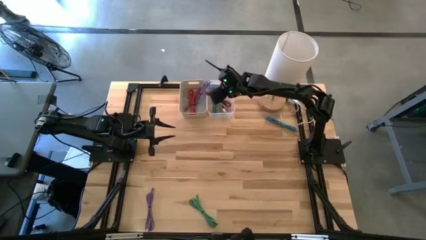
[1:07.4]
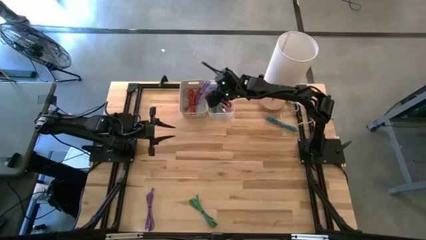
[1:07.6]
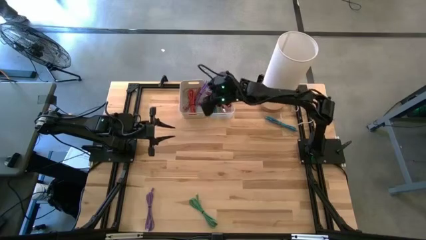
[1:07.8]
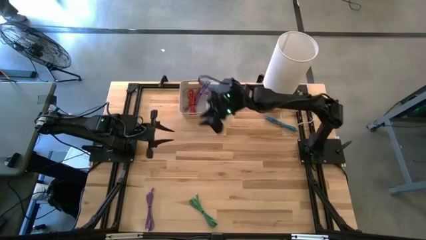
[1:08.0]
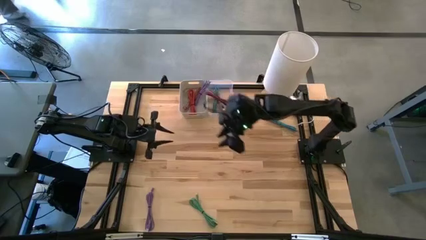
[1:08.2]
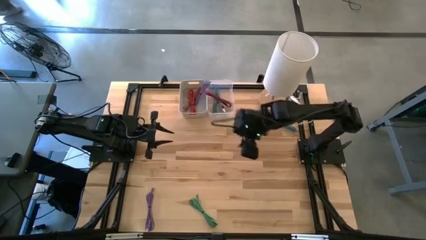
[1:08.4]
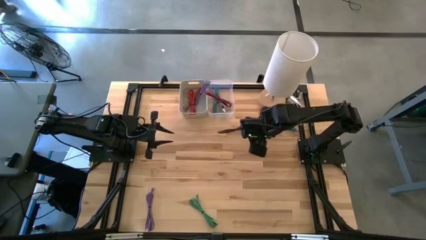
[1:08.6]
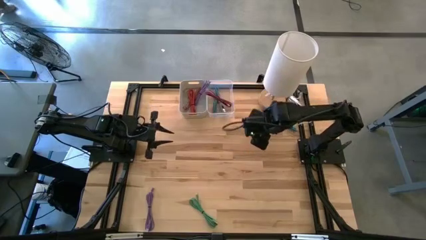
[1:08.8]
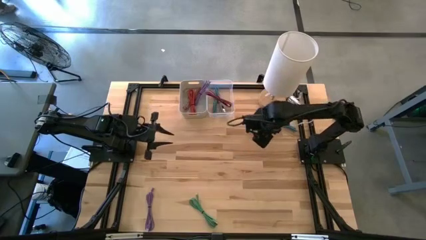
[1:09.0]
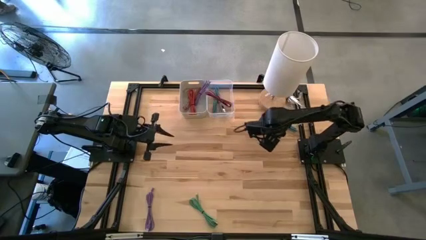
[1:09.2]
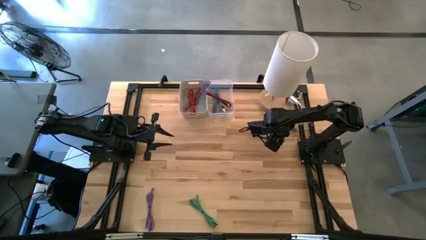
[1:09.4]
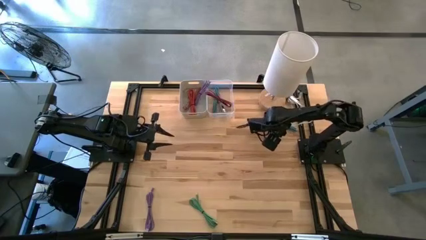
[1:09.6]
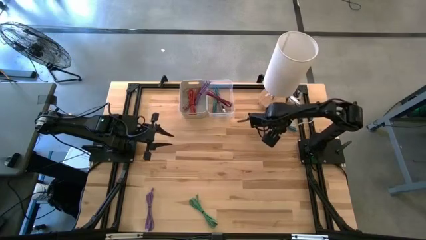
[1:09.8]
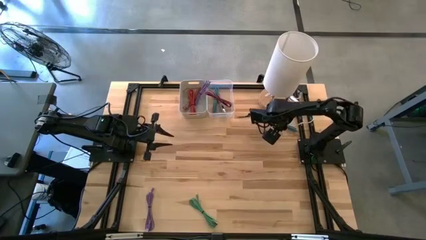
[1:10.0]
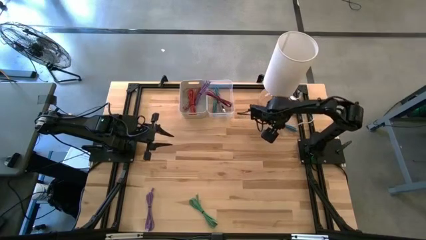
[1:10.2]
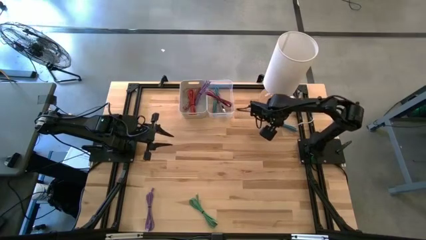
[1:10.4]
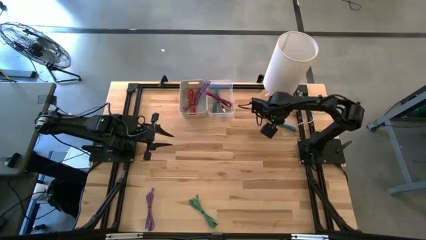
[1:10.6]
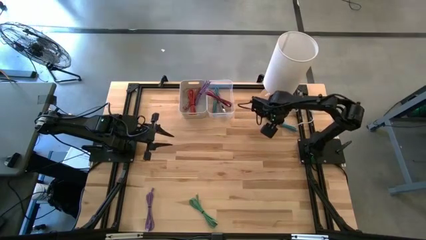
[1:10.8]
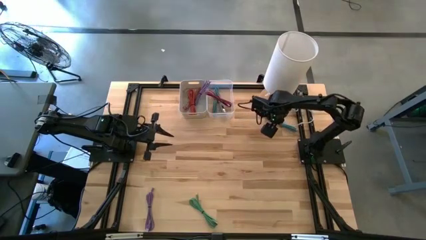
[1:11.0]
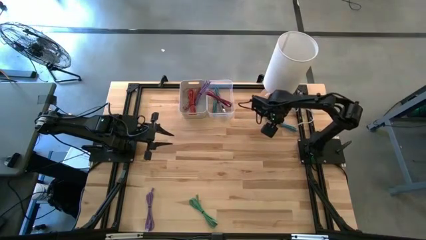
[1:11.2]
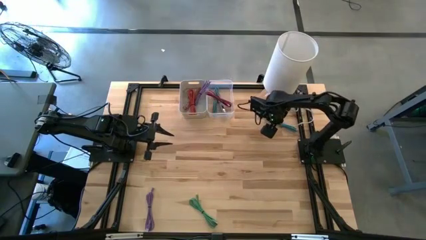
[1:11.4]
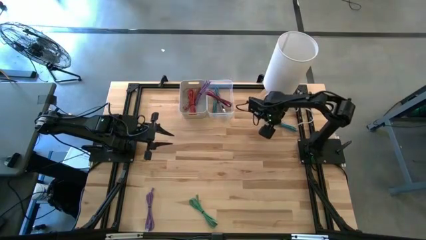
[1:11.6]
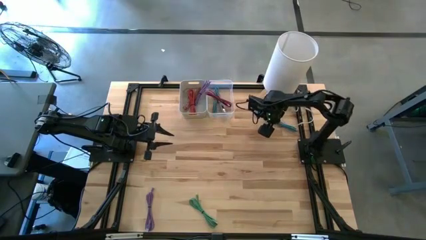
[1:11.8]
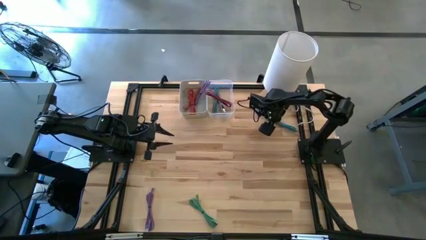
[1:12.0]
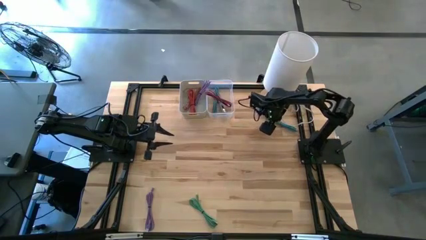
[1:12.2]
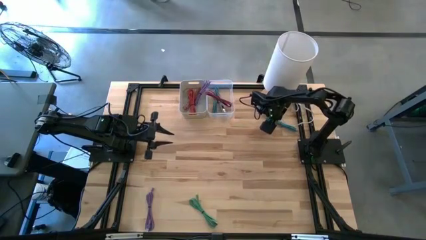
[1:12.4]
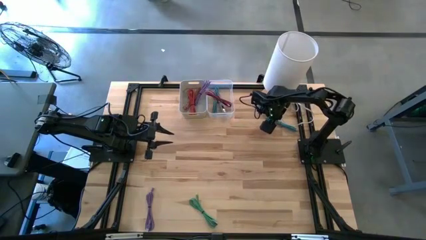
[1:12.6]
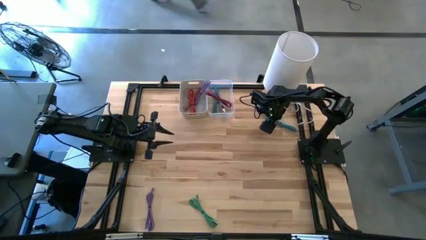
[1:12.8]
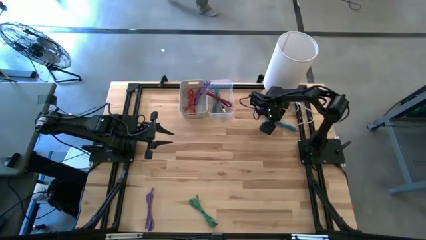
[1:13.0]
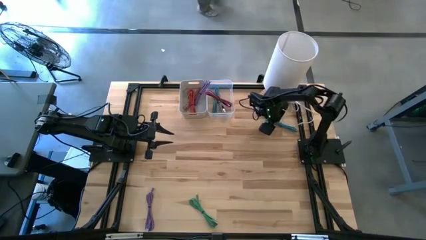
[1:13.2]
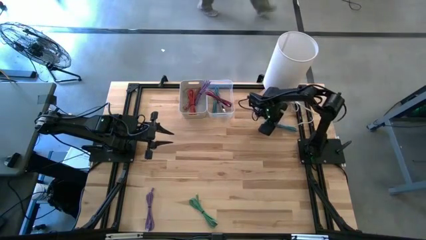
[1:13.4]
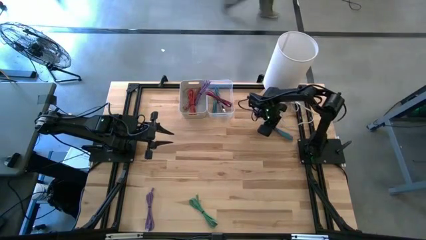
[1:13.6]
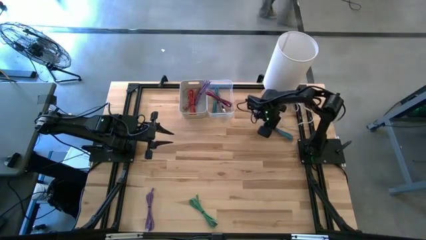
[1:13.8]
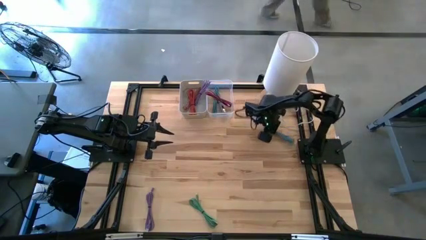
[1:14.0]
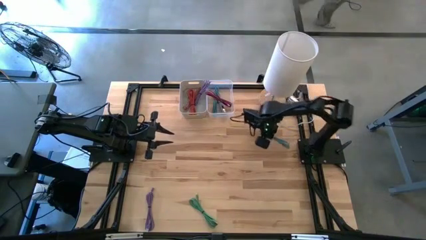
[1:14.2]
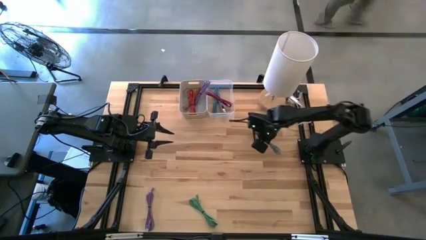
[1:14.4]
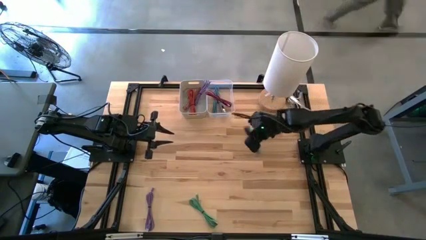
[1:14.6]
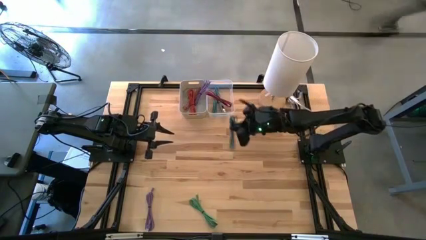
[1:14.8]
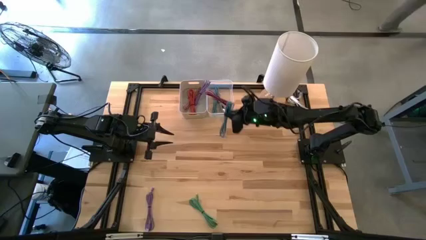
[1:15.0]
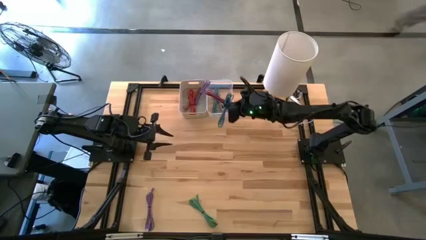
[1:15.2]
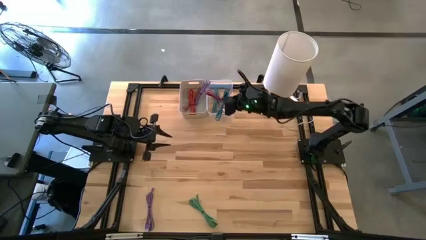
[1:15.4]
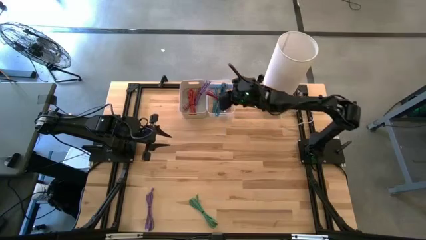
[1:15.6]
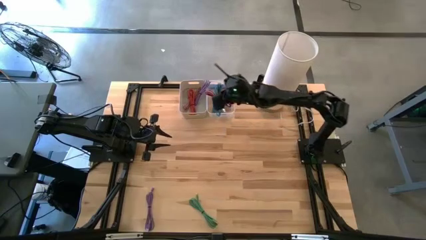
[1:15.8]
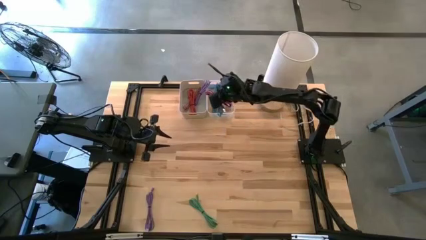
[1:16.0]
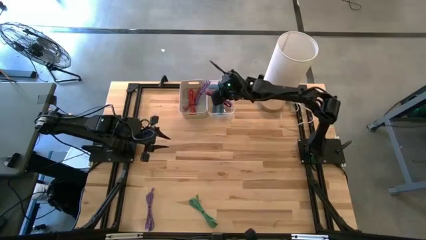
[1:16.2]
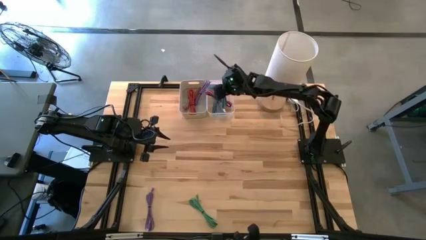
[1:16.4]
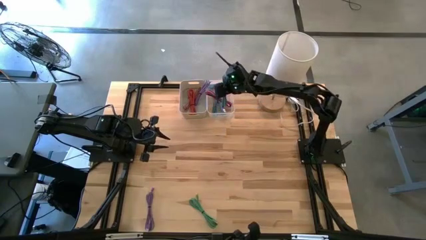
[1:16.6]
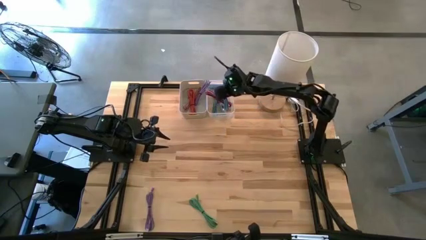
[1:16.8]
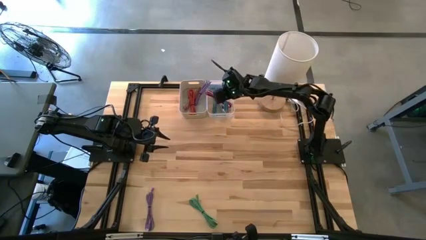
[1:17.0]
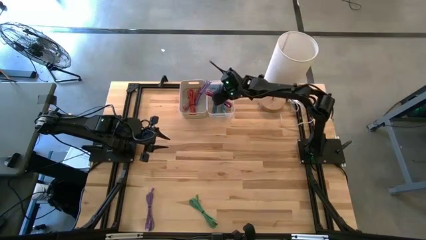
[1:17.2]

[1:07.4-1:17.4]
Task: Pick & Place USB Port
Put the blue and white USB cable into the white transparent bin

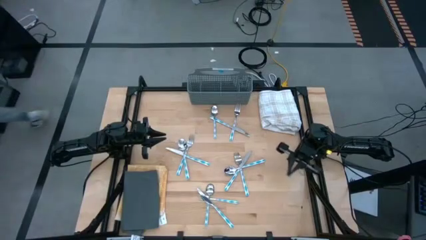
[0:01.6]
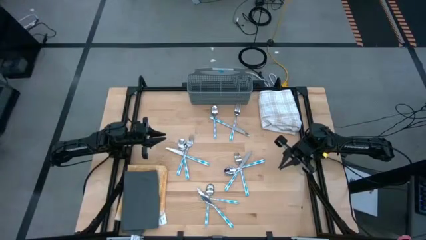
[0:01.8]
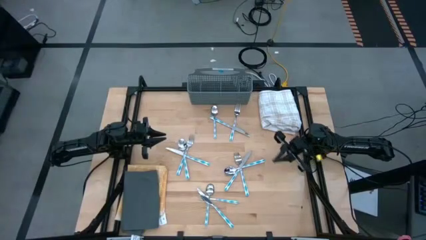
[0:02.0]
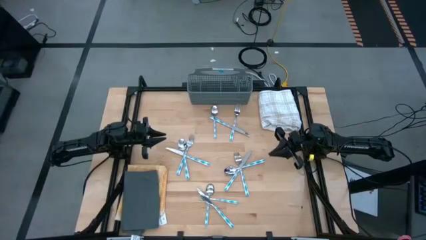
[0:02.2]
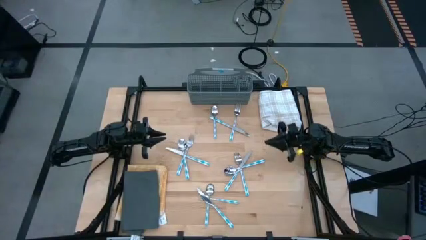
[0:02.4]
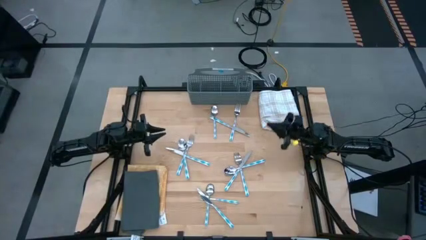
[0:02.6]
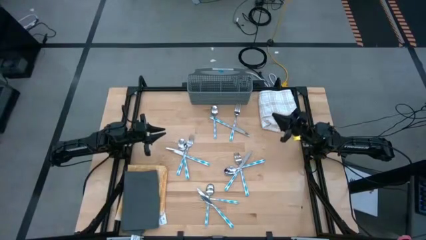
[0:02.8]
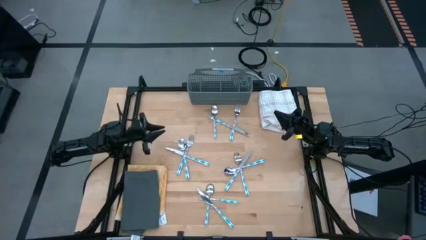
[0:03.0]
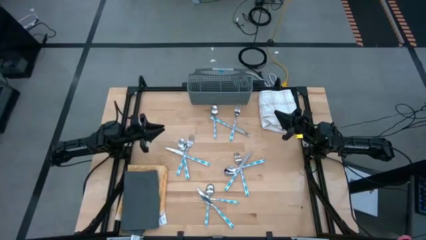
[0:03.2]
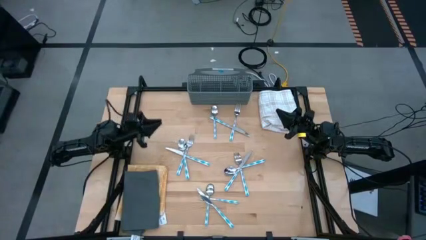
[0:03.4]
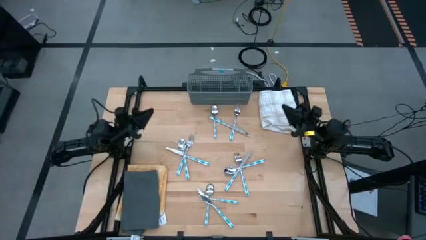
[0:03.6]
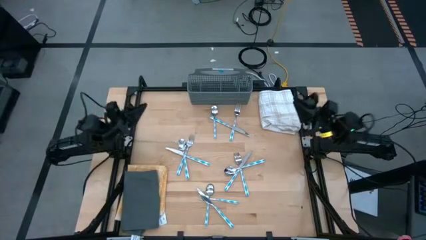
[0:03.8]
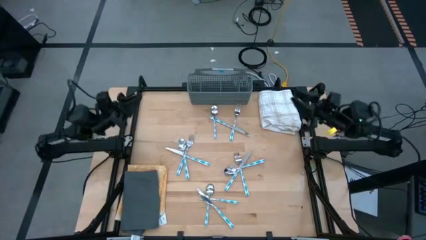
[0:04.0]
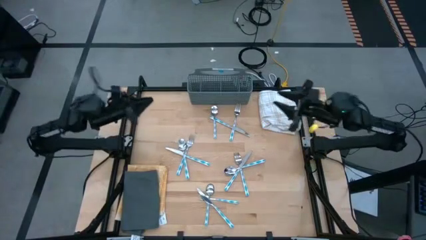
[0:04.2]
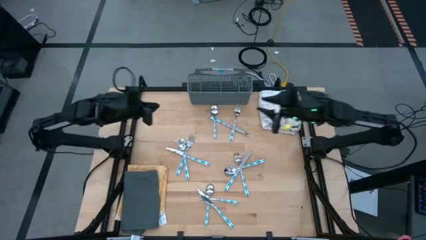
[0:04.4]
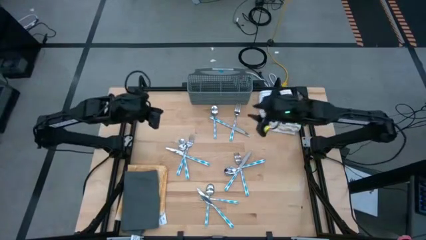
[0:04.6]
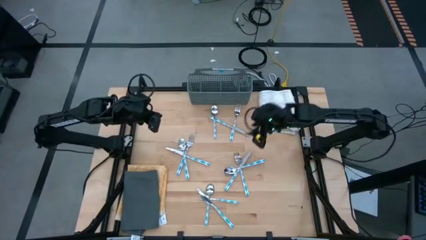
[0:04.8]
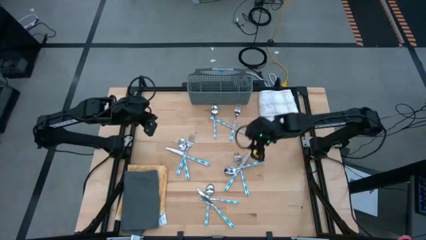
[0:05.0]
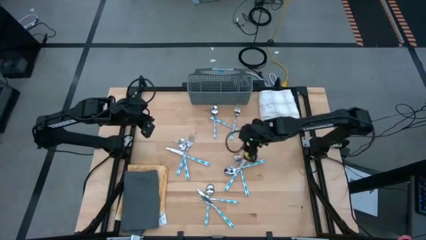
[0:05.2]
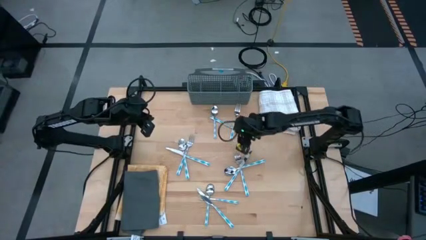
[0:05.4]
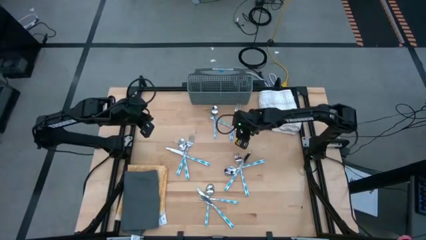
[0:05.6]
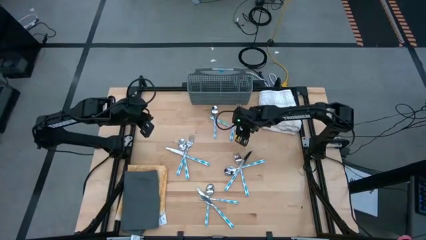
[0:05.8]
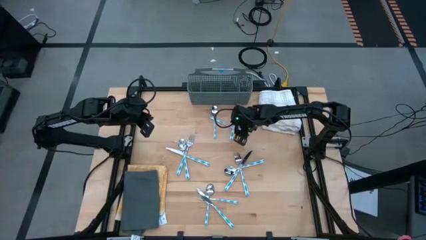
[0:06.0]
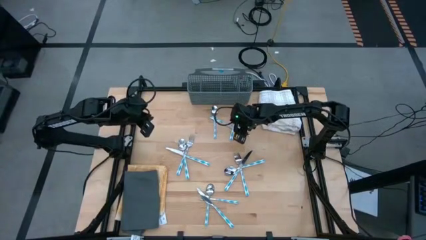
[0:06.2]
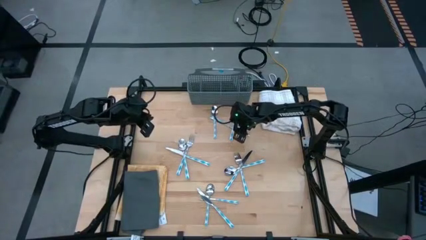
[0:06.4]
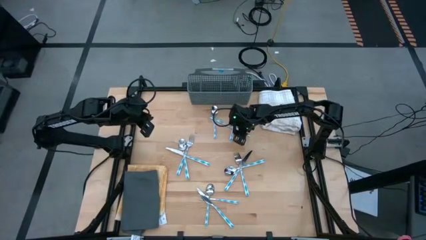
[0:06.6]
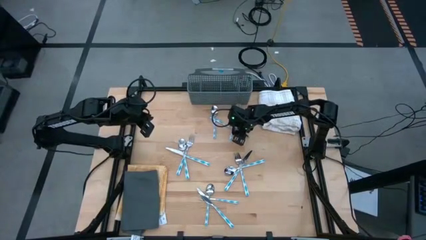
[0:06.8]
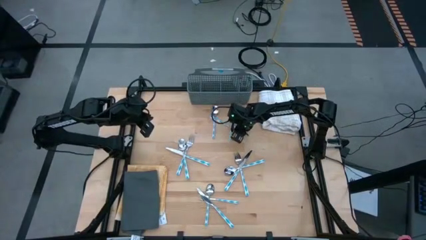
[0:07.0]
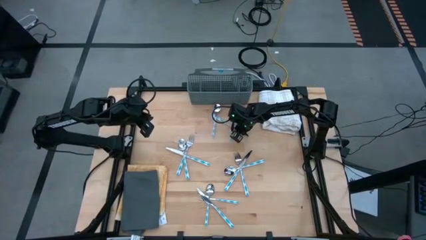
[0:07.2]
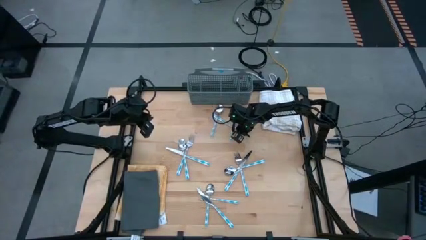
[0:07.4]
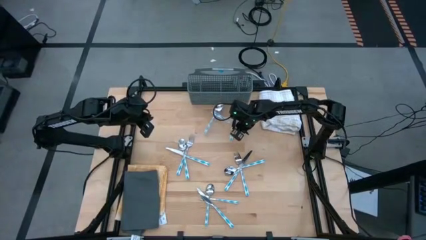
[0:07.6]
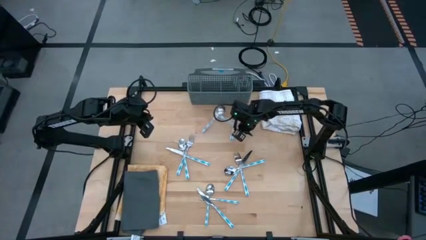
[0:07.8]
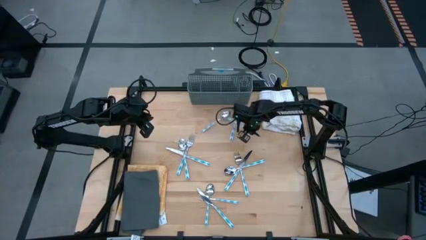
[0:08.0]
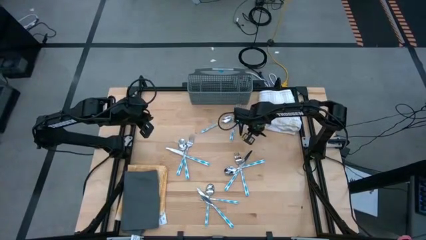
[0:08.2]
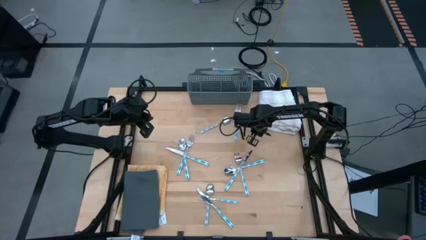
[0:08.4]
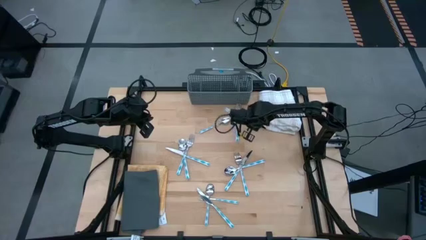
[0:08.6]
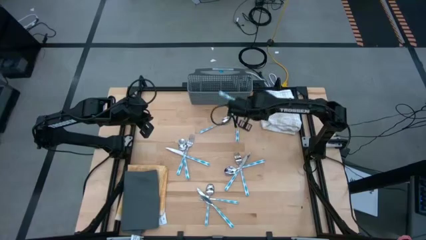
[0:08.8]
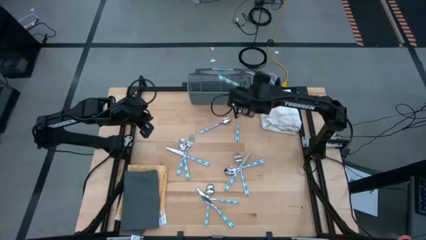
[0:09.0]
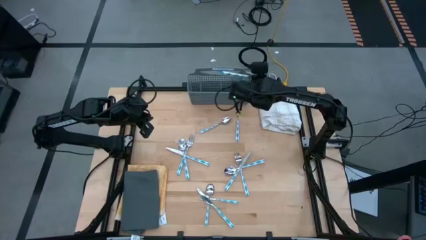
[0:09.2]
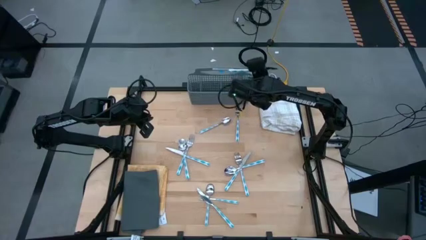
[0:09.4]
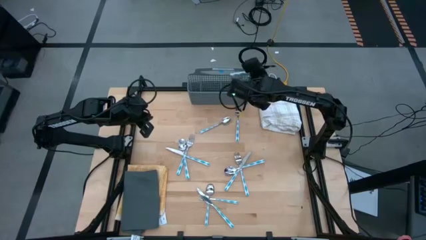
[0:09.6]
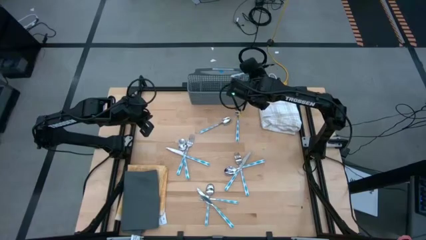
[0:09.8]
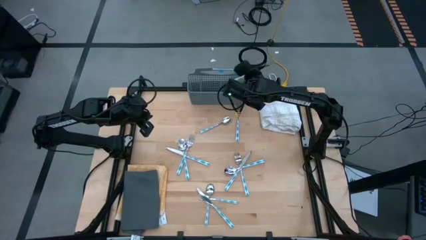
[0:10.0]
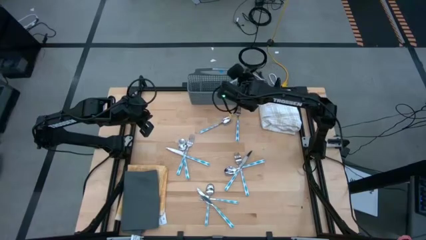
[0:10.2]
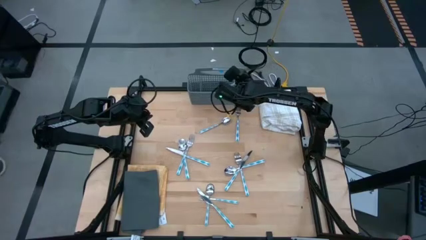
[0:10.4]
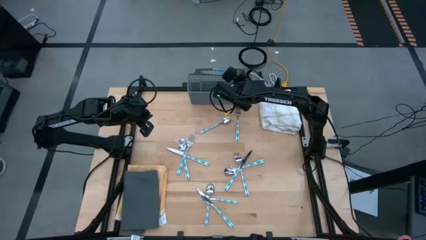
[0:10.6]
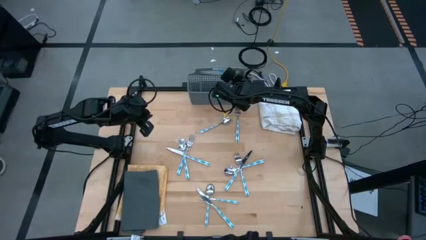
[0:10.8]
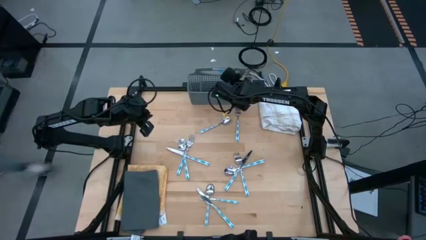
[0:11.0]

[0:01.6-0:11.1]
Task: Sort silverware
Put the top blue table knife into the gray silverware rack
